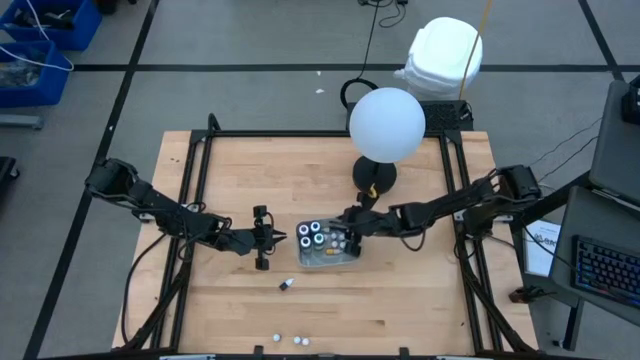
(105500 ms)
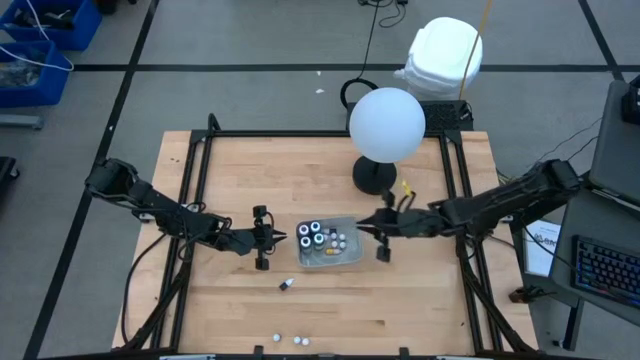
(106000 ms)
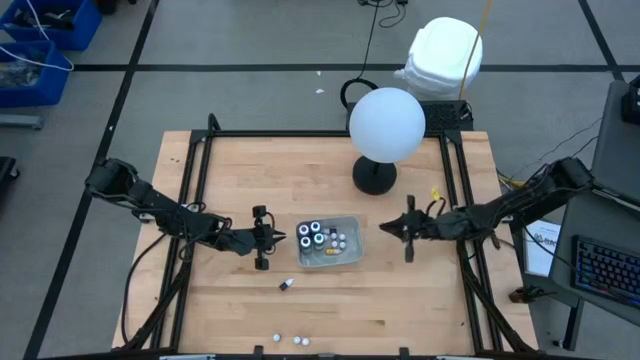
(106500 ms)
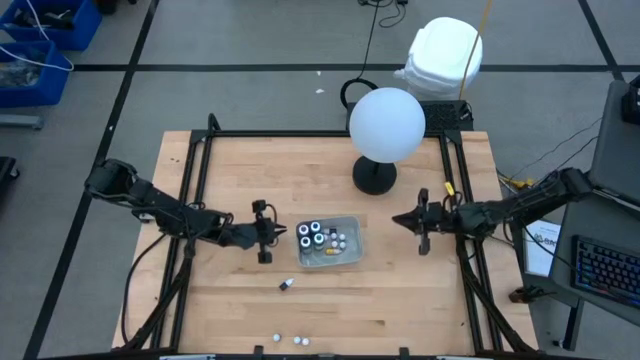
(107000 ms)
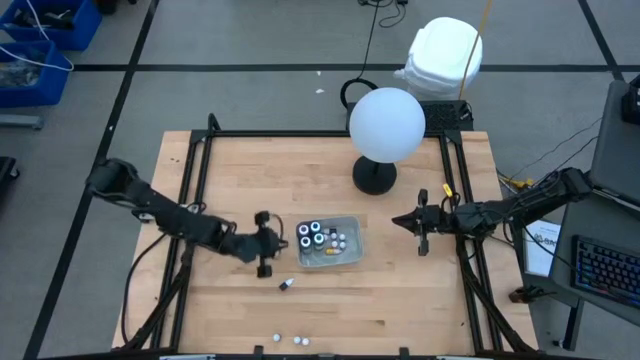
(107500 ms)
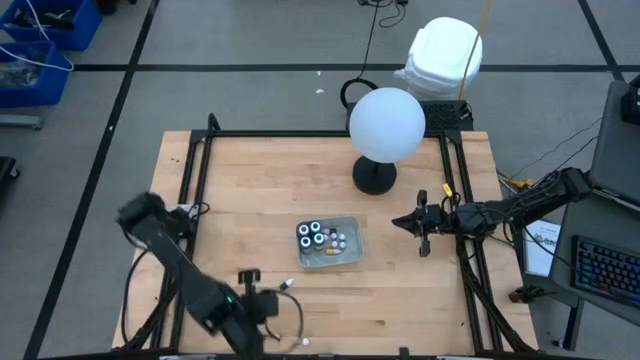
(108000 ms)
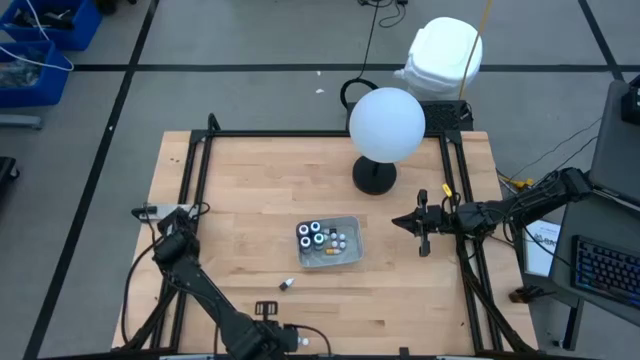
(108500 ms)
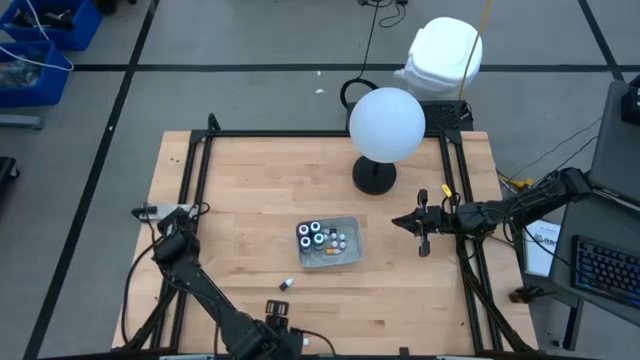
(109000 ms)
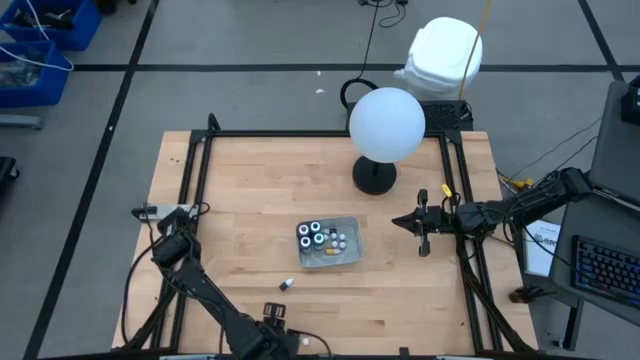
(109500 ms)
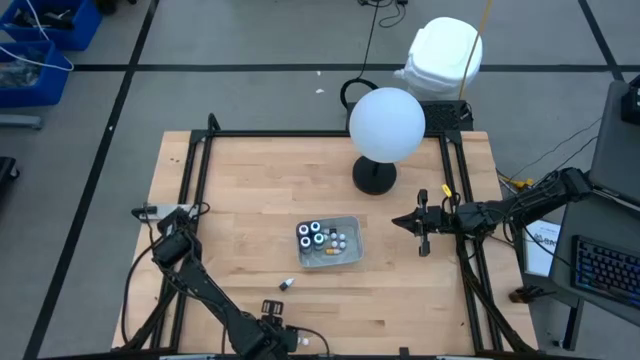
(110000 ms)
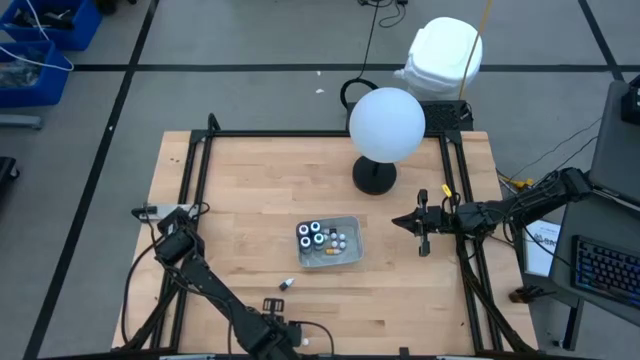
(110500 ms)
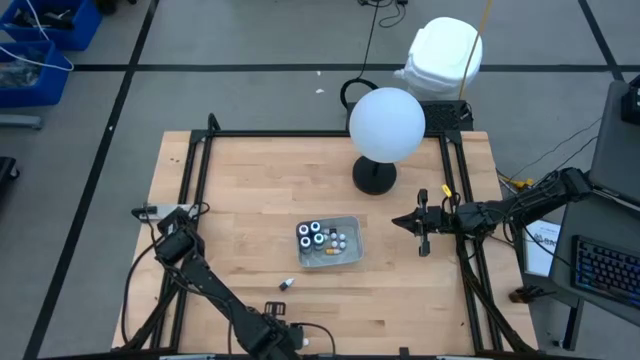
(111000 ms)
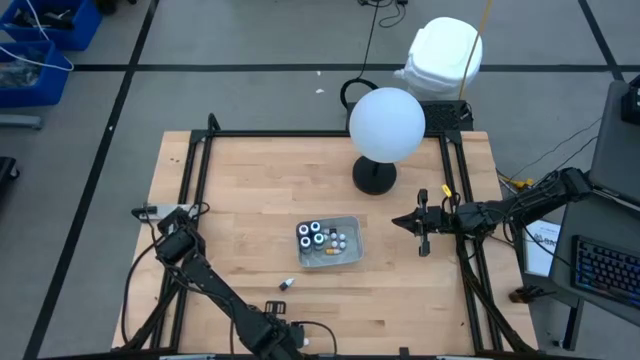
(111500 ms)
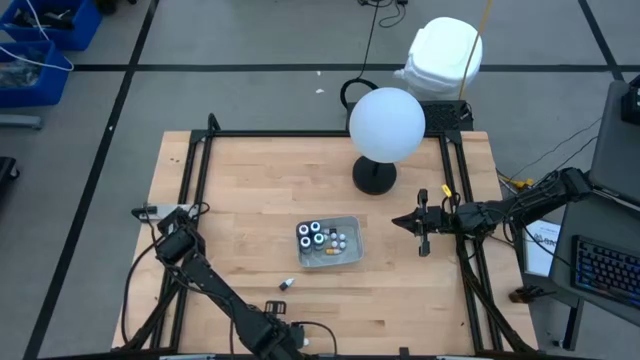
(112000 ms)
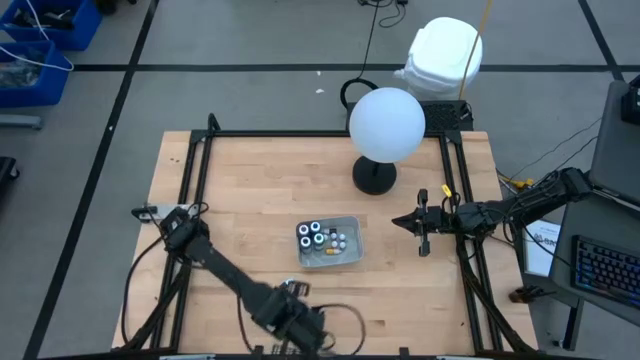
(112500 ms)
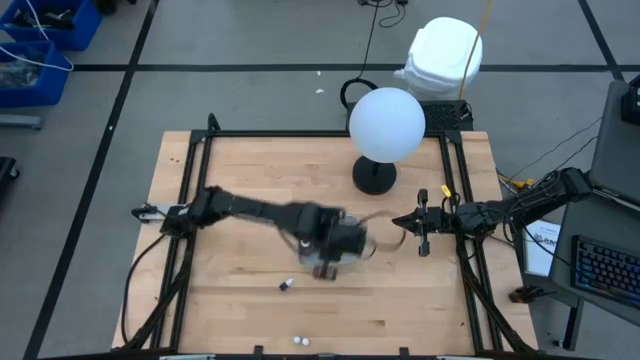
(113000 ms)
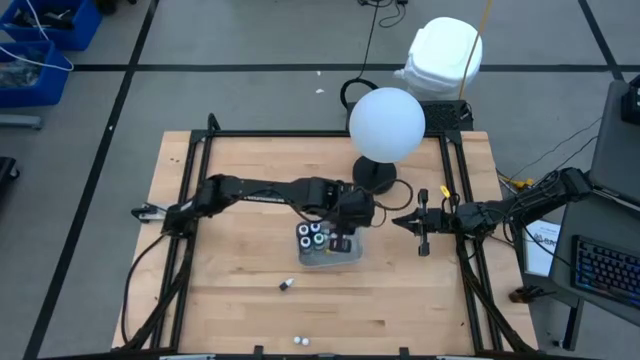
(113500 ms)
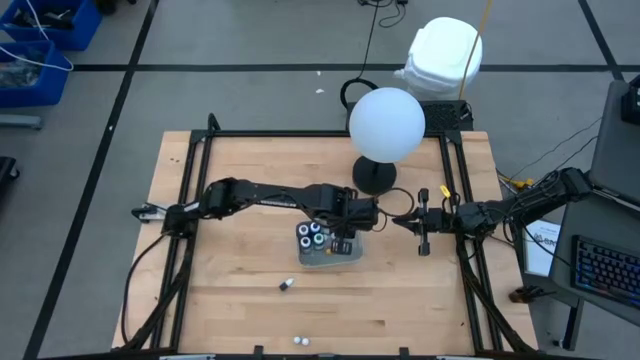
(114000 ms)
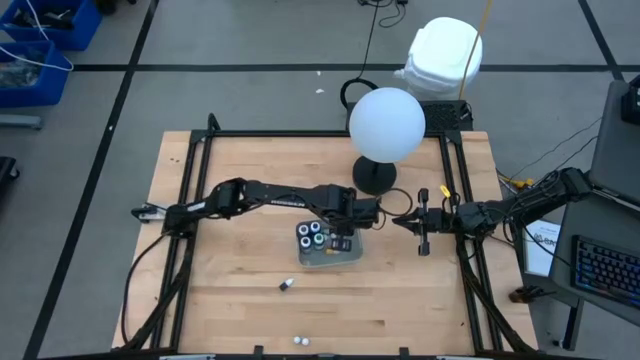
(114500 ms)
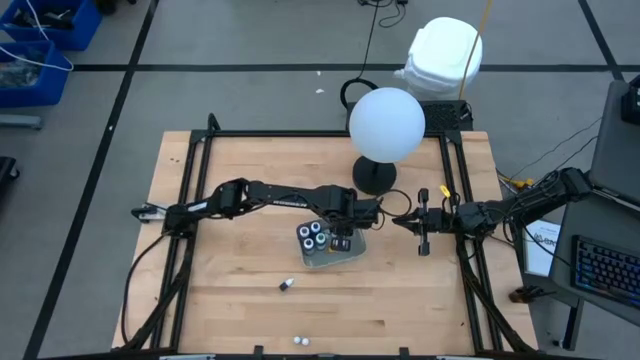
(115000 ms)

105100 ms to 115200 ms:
Task: Pick & Place food coloring
Put the small green food coloring bottle into the gray bin

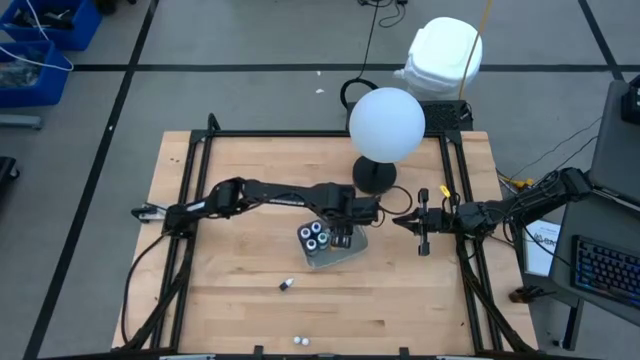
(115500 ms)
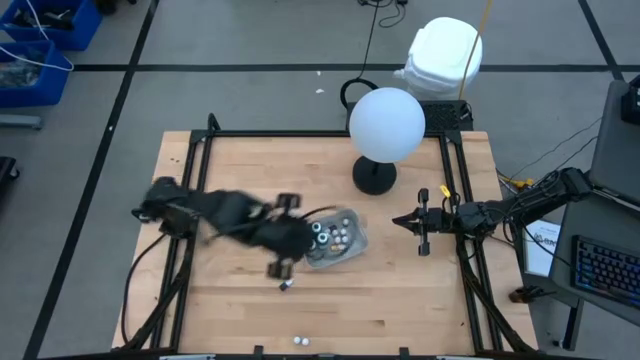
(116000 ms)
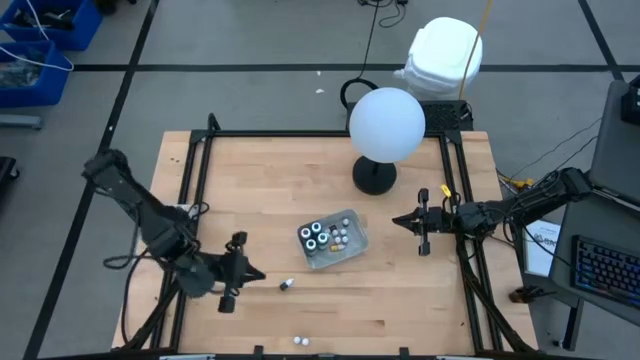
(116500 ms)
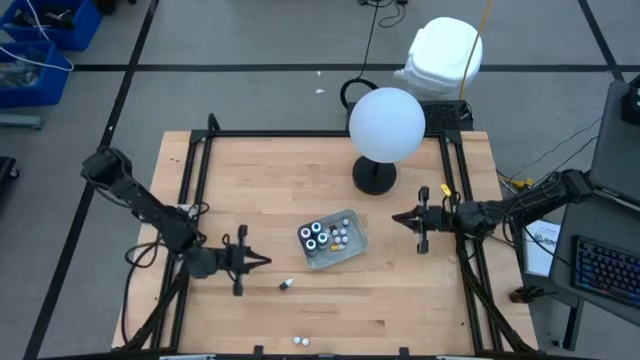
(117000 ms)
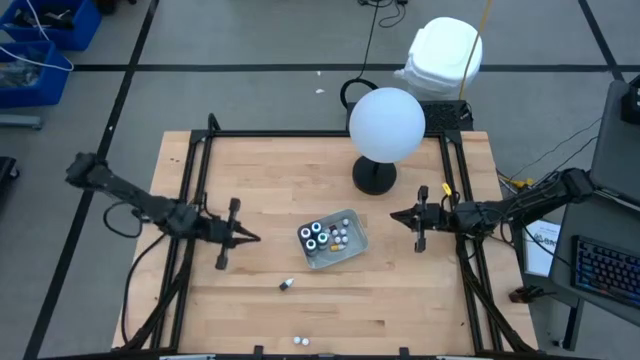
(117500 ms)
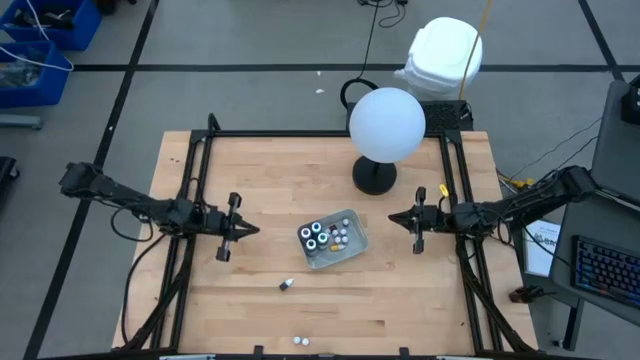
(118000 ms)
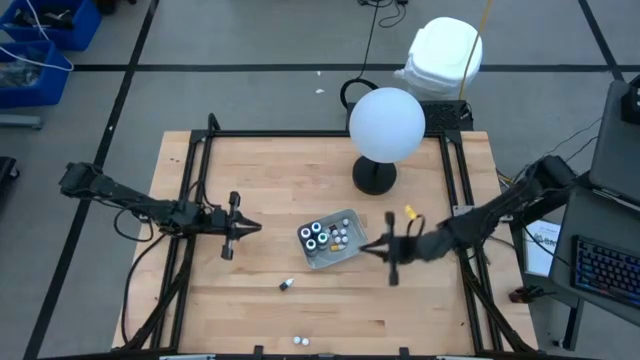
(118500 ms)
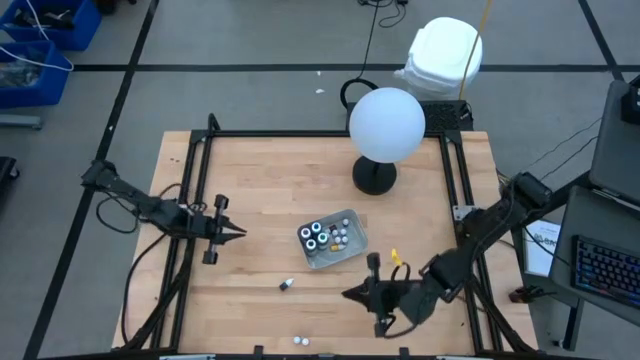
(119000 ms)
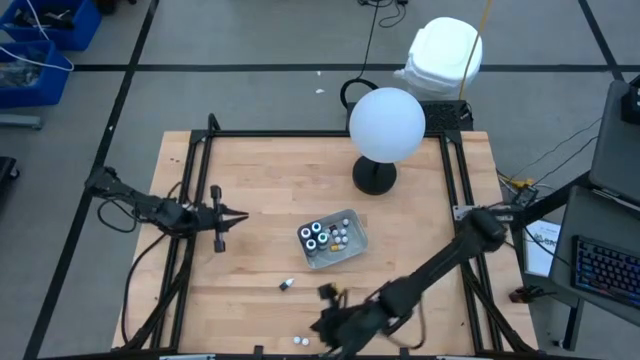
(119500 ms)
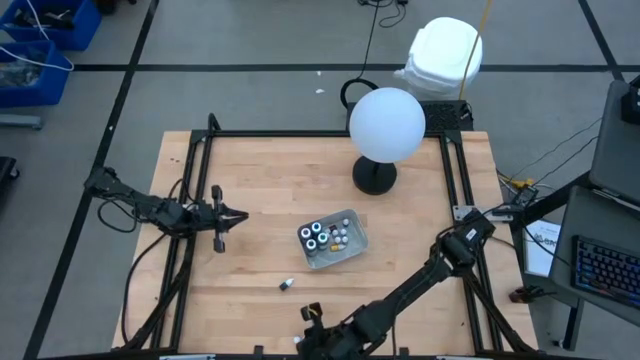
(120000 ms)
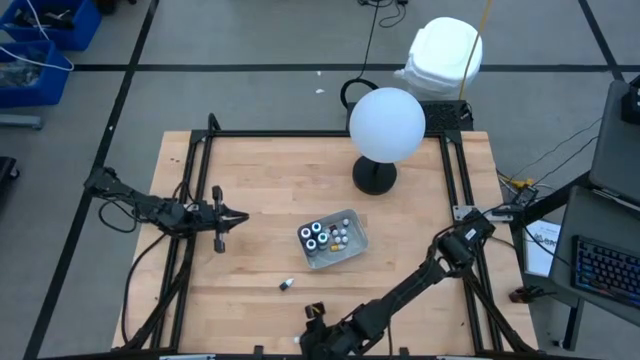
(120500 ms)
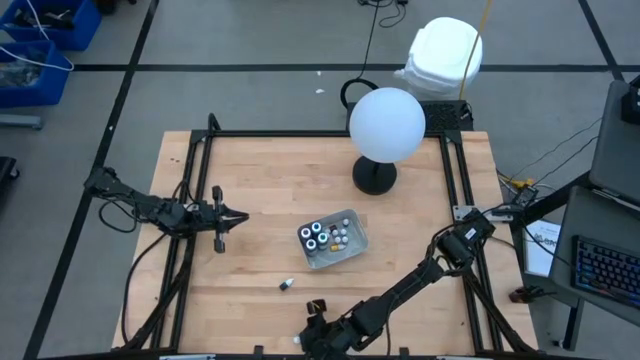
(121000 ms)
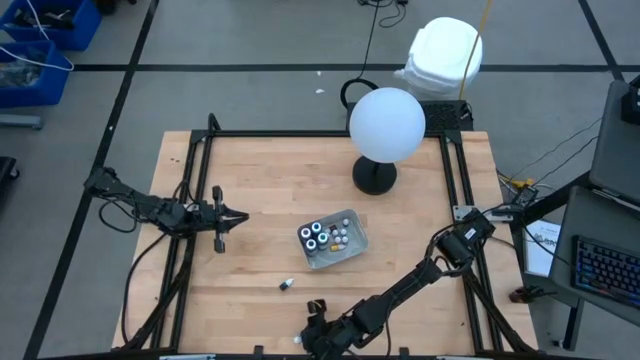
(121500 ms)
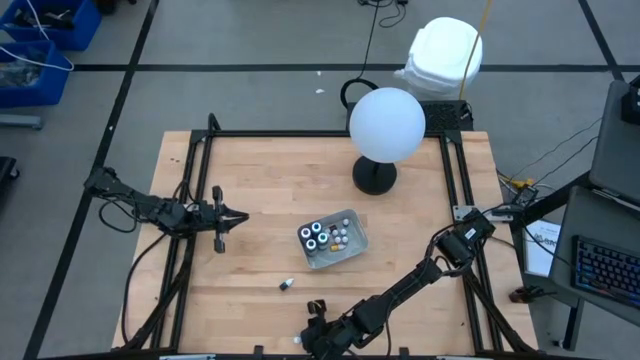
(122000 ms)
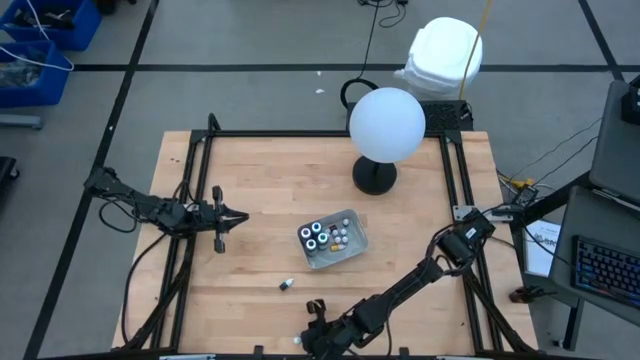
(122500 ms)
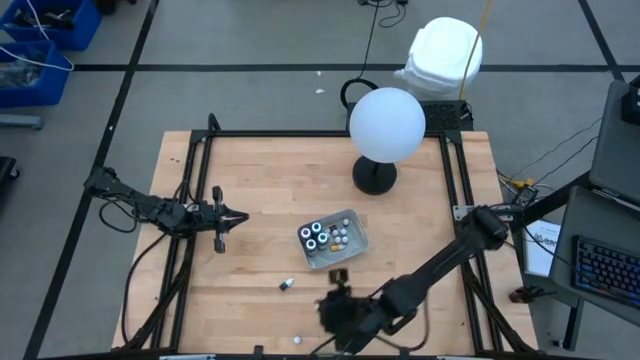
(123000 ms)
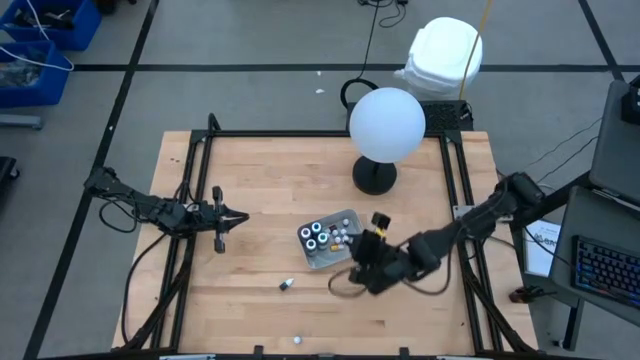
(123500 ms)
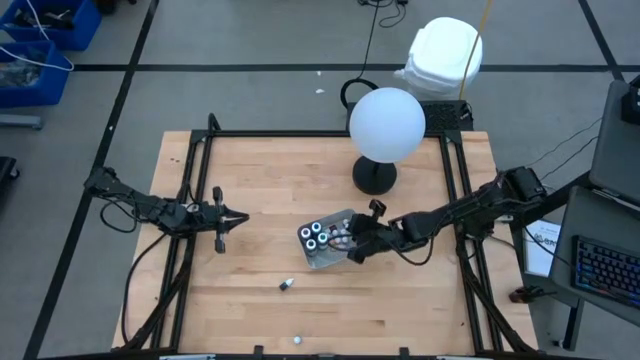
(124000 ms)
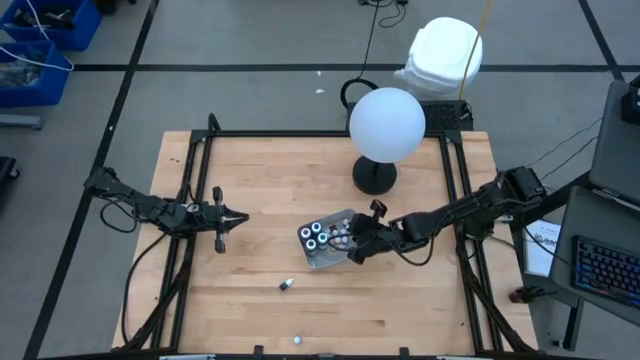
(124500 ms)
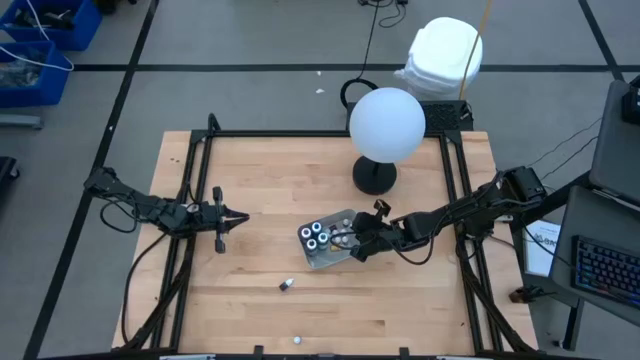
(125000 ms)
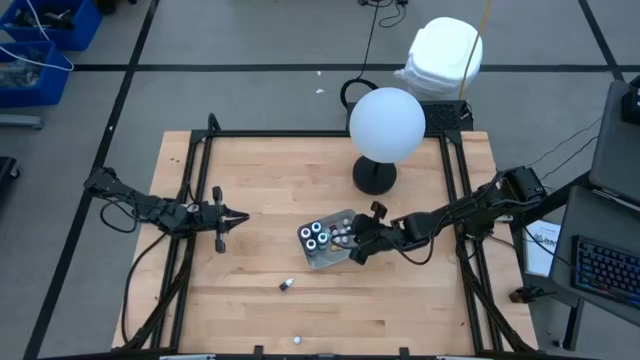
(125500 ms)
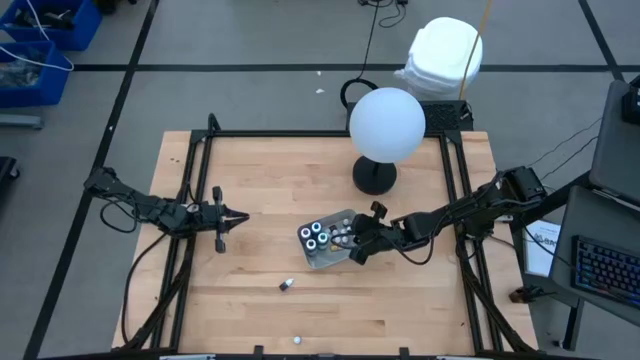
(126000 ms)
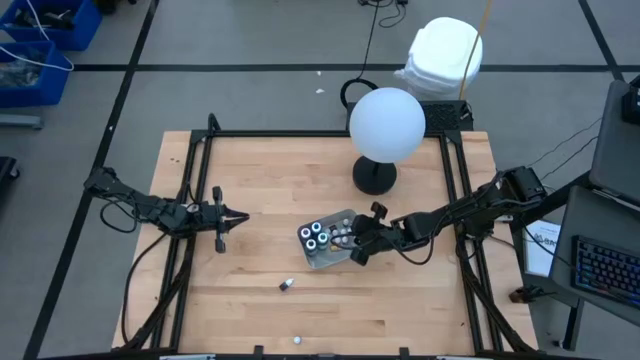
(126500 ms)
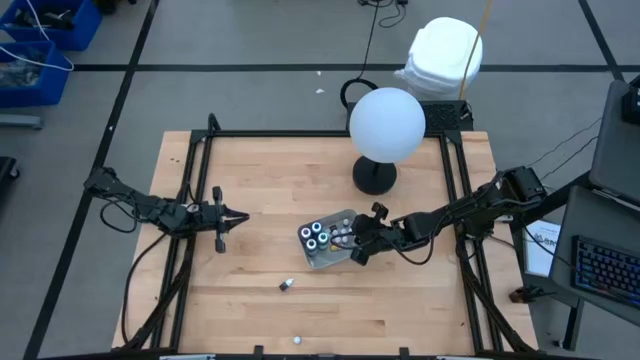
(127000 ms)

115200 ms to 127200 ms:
Put the small yellow food coloring bottle into the gray bin
